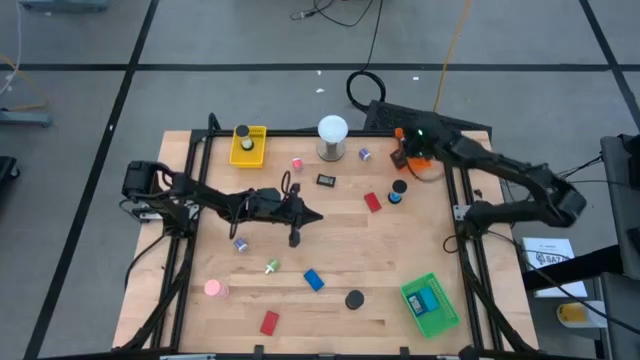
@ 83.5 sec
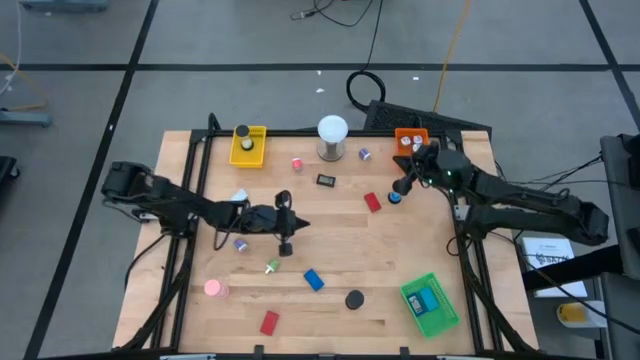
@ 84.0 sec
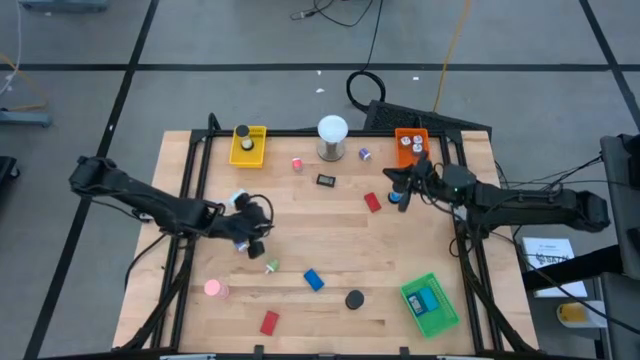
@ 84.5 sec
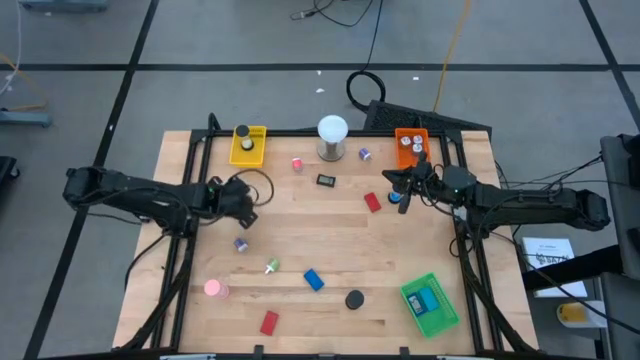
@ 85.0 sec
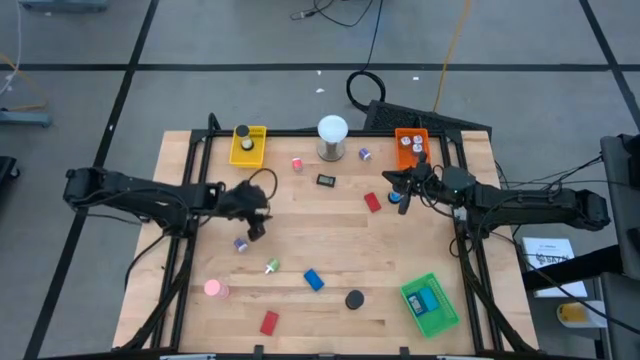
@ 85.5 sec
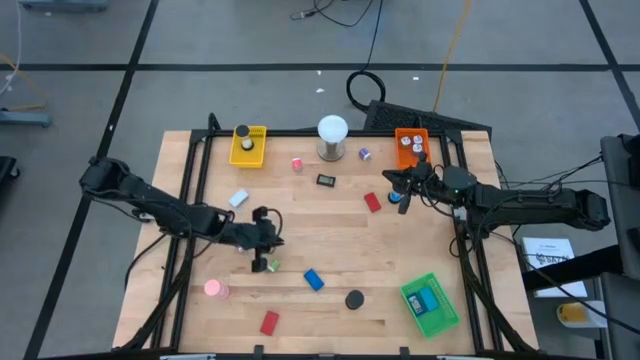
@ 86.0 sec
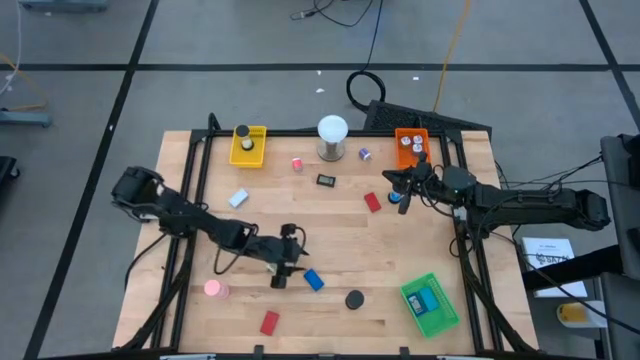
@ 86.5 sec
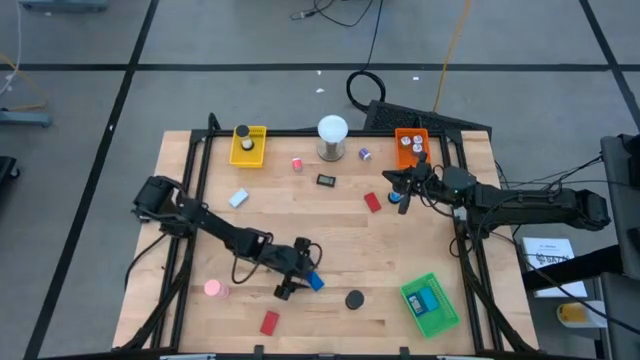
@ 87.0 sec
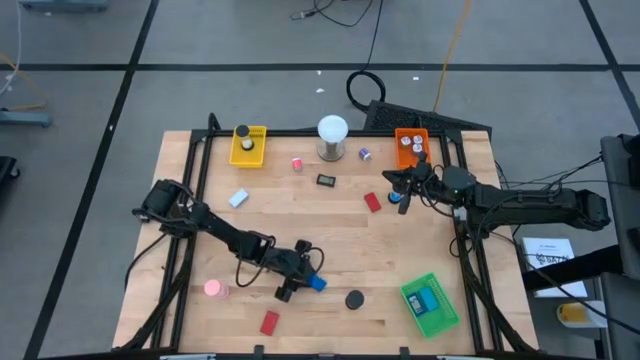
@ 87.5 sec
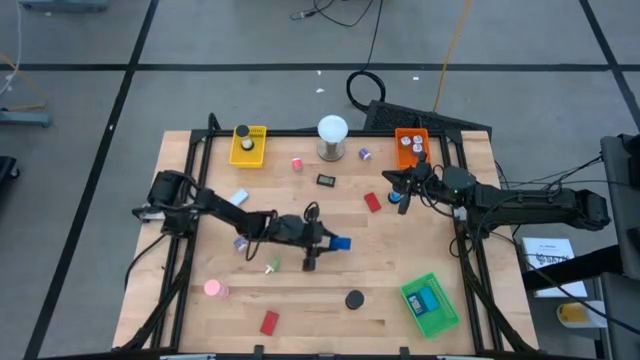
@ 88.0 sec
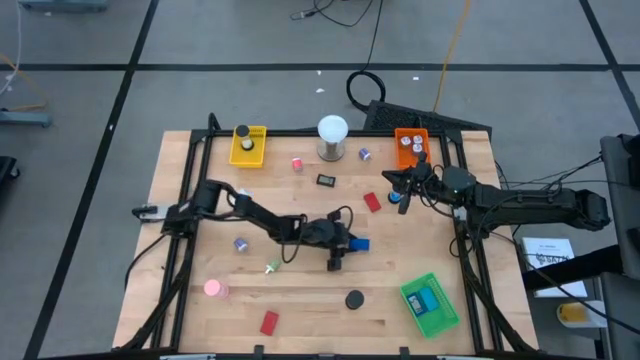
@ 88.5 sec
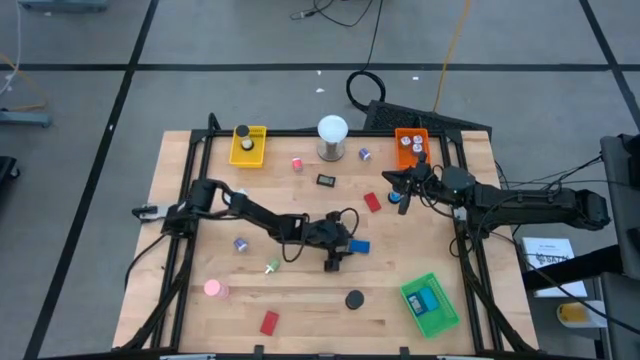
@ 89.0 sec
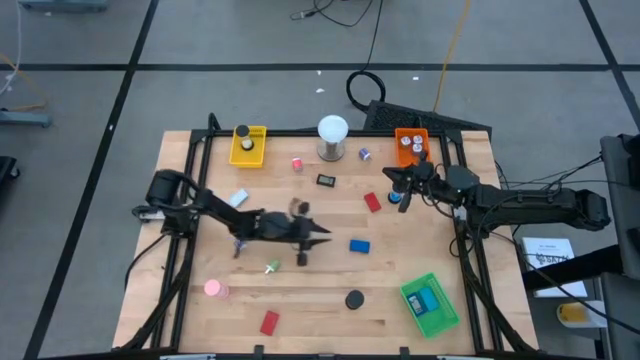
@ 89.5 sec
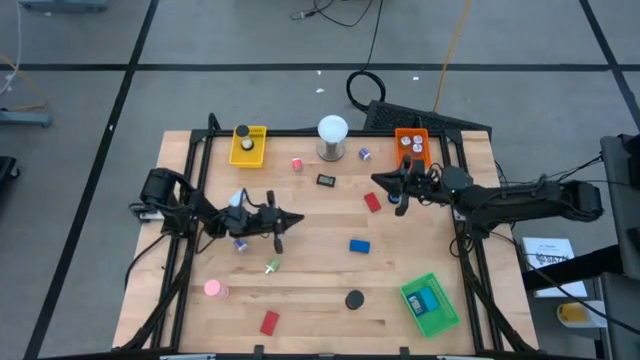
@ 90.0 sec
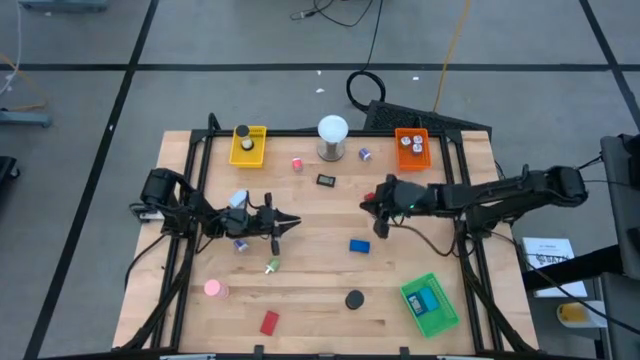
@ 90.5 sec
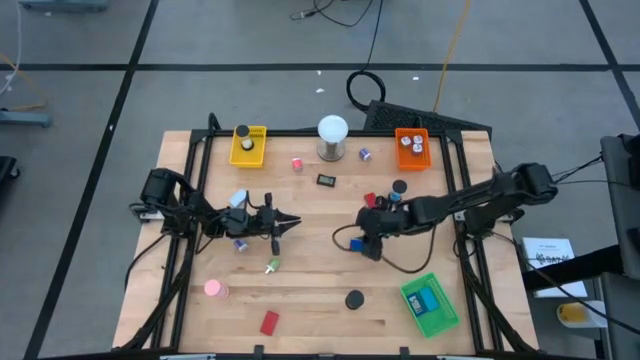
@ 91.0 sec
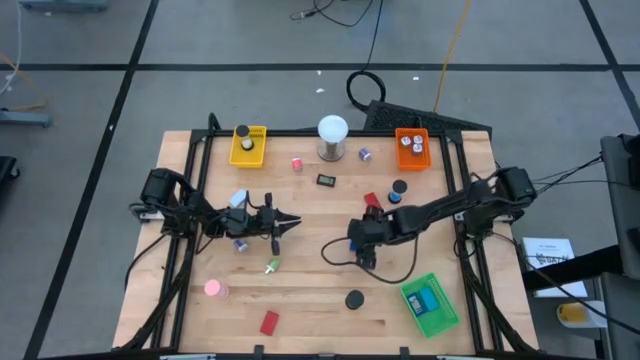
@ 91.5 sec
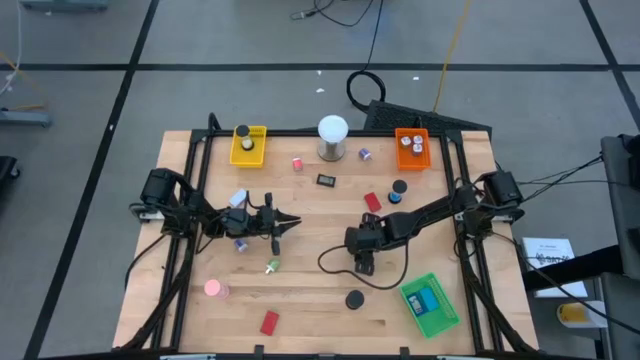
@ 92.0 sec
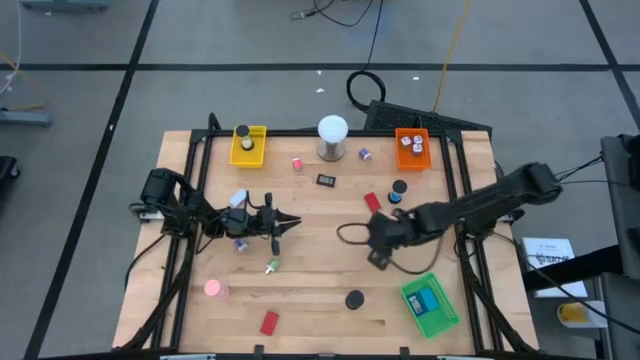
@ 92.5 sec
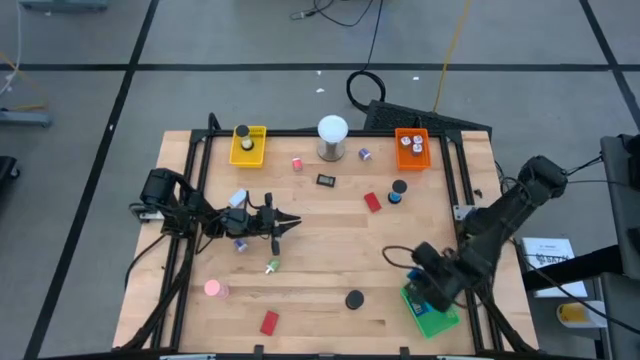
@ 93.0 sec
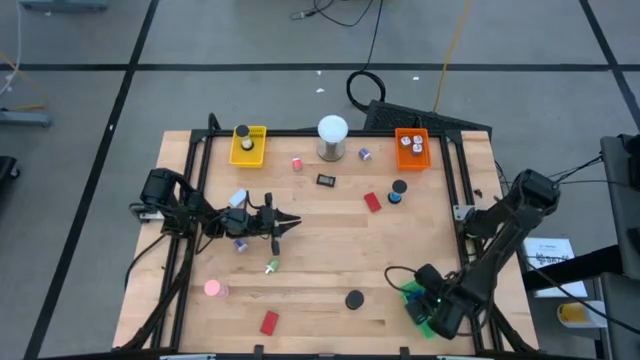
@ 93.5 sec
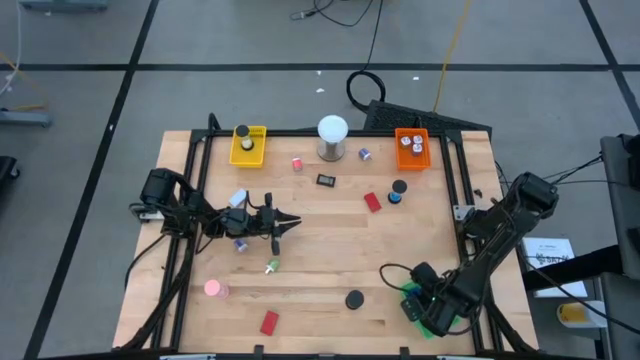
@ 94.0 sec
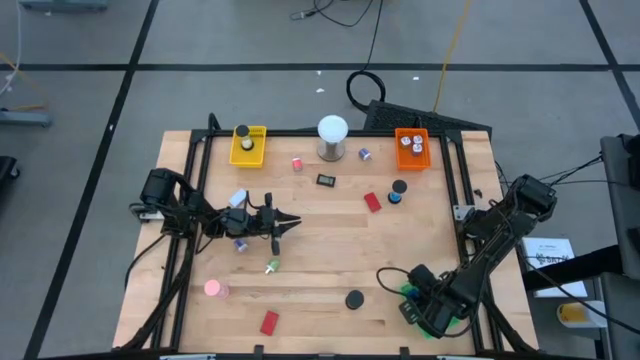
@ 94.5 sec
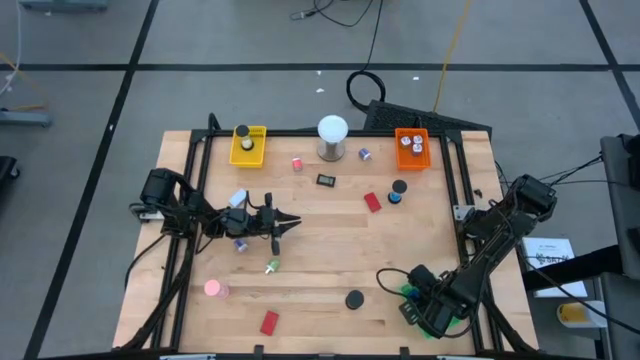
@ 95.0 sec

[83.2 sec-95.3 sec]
Task: Pick & Place Office items
Put the blue digital clock into the green bin
